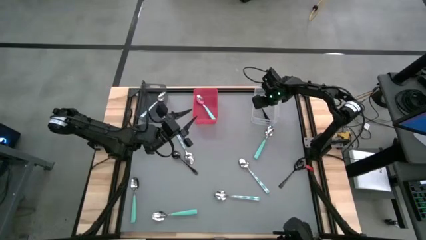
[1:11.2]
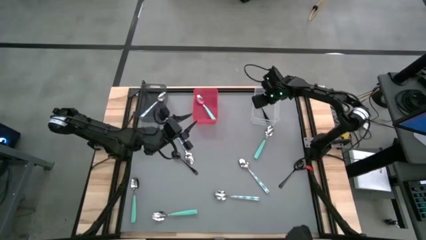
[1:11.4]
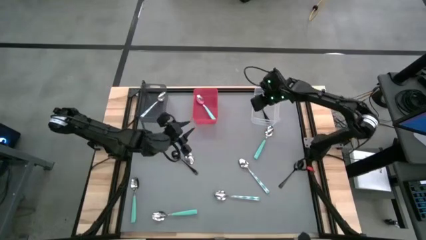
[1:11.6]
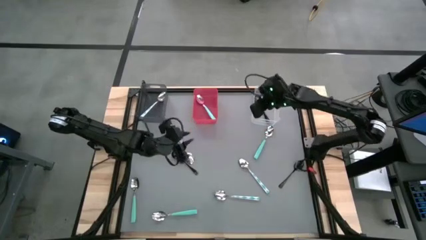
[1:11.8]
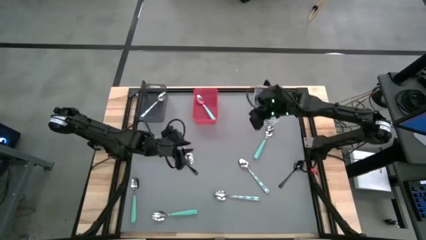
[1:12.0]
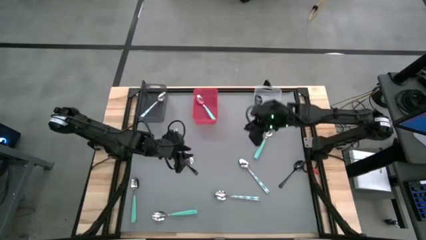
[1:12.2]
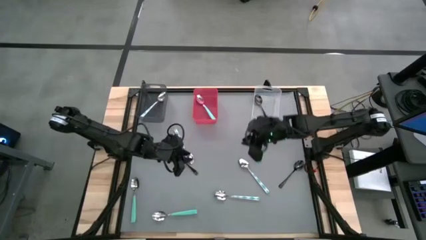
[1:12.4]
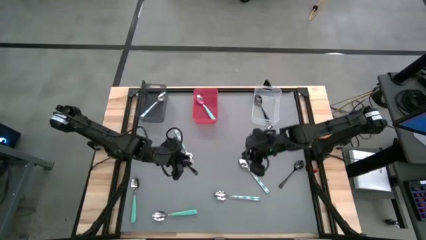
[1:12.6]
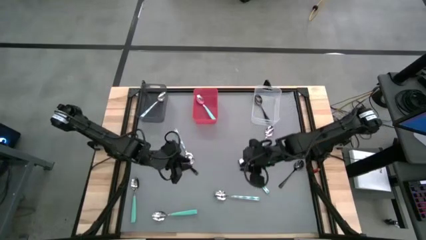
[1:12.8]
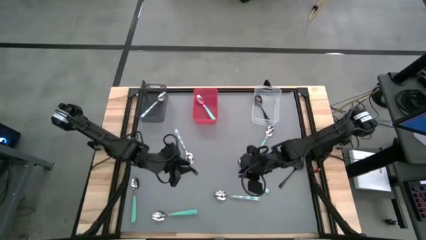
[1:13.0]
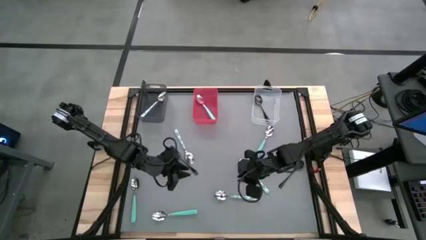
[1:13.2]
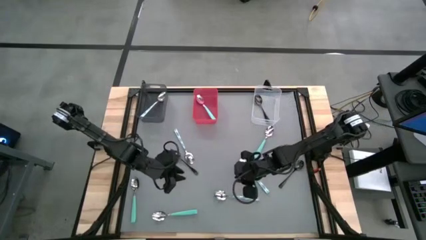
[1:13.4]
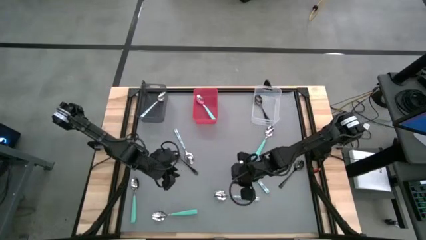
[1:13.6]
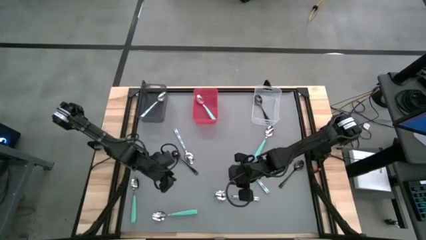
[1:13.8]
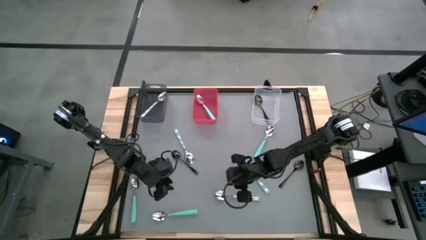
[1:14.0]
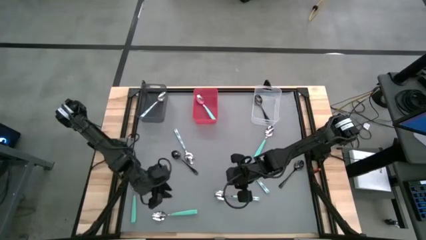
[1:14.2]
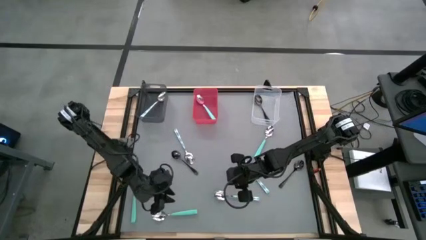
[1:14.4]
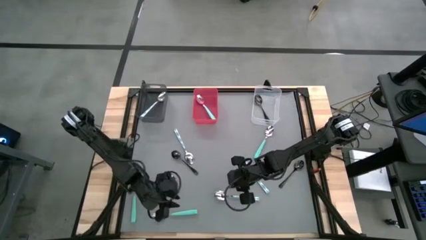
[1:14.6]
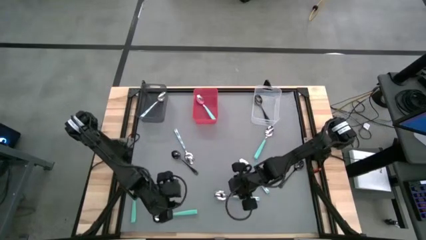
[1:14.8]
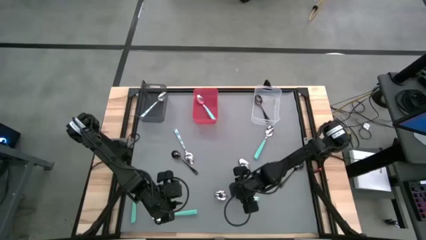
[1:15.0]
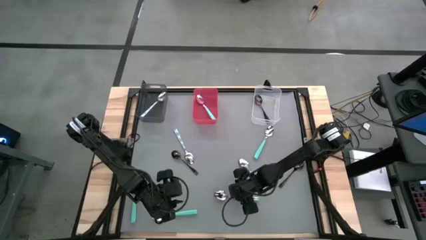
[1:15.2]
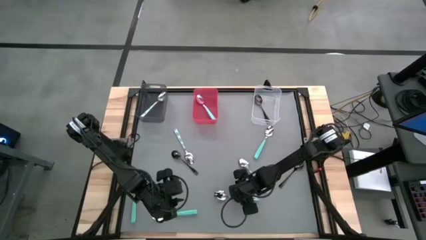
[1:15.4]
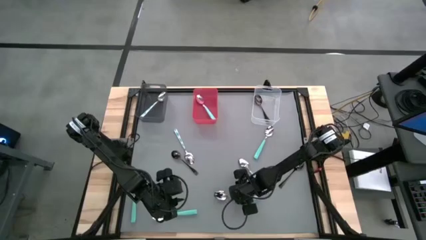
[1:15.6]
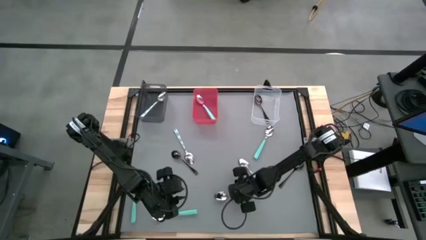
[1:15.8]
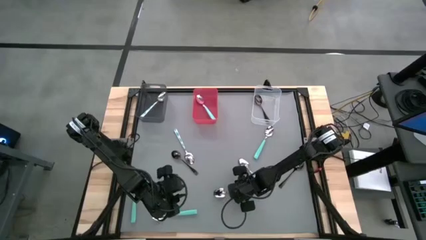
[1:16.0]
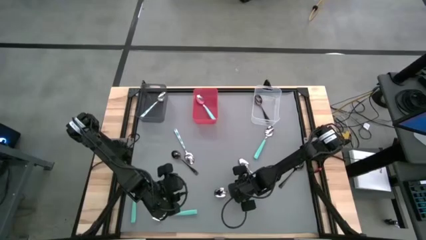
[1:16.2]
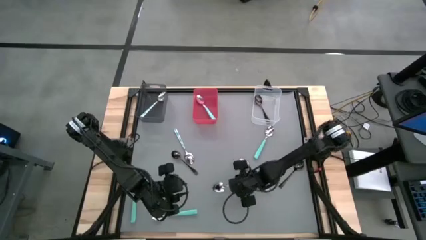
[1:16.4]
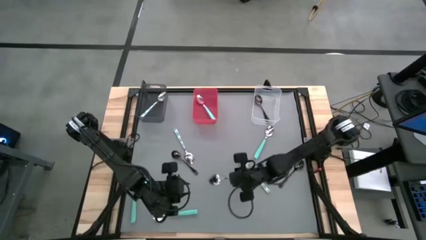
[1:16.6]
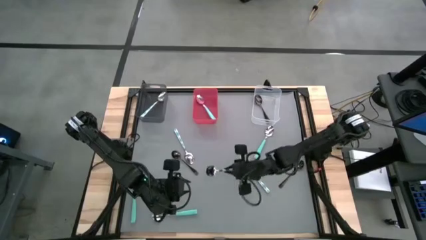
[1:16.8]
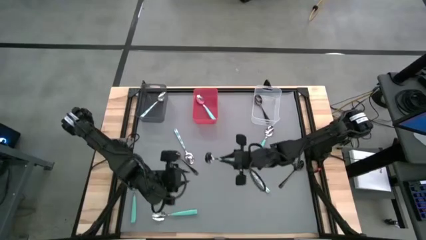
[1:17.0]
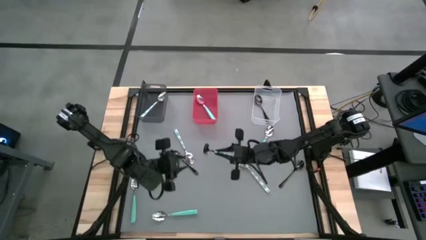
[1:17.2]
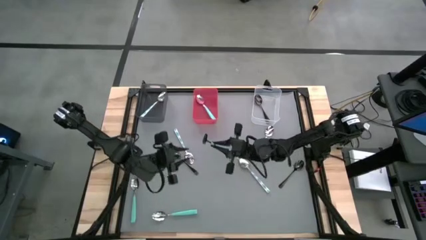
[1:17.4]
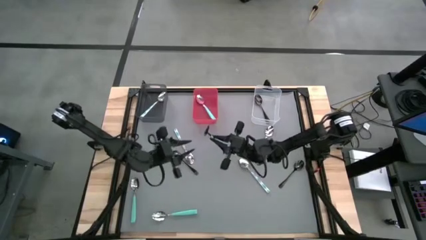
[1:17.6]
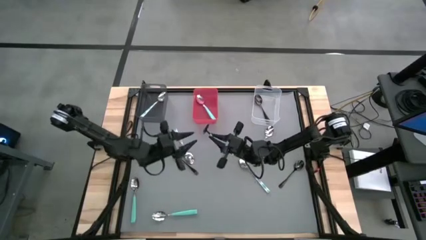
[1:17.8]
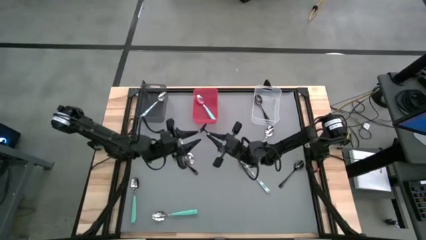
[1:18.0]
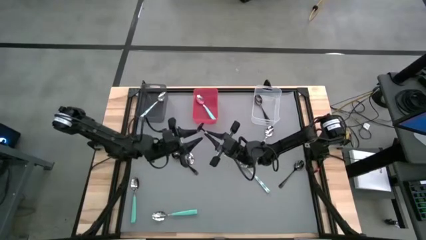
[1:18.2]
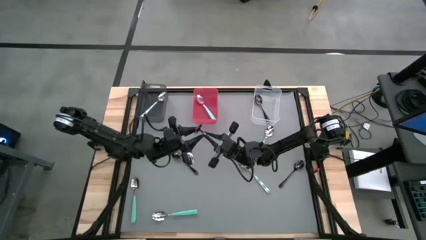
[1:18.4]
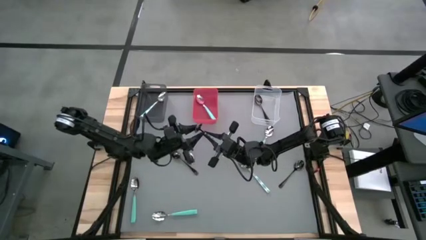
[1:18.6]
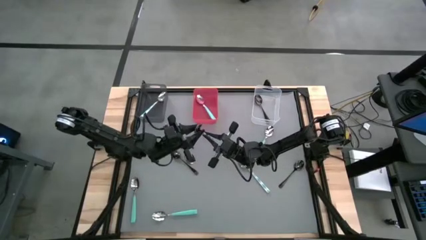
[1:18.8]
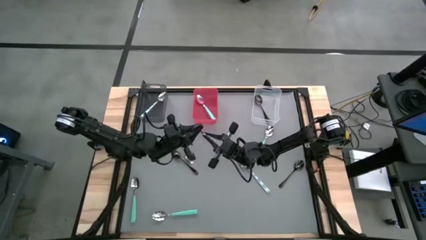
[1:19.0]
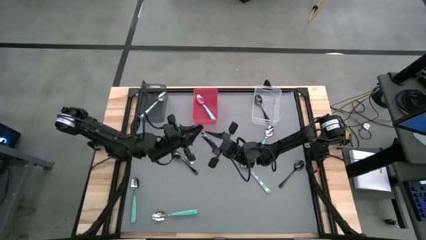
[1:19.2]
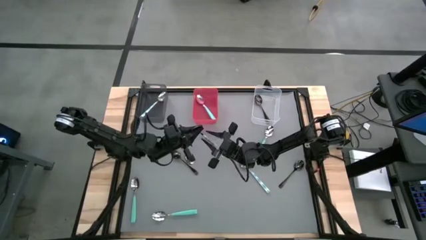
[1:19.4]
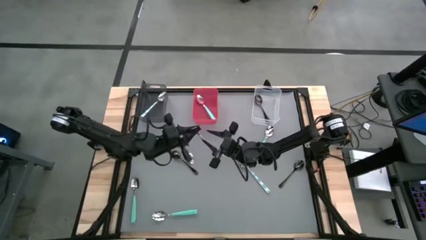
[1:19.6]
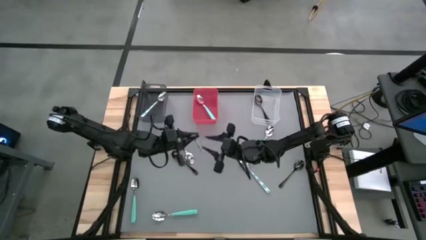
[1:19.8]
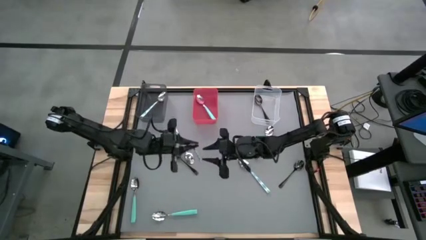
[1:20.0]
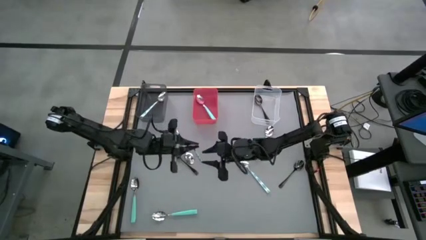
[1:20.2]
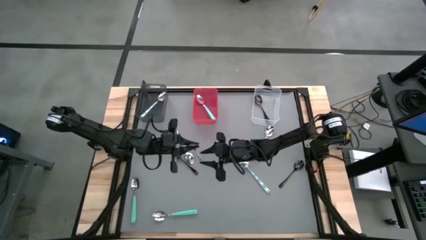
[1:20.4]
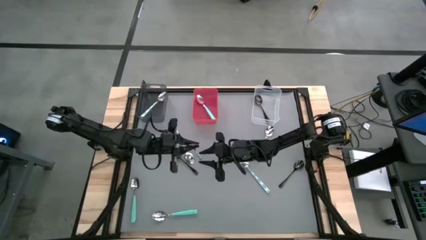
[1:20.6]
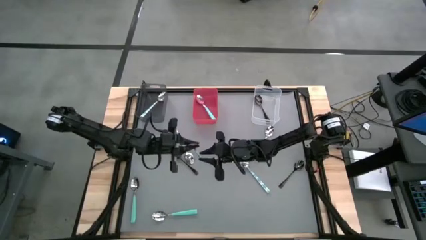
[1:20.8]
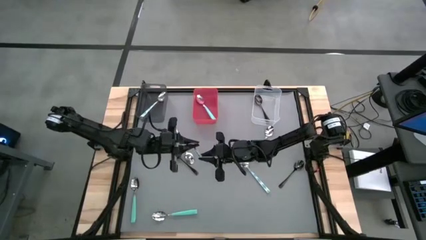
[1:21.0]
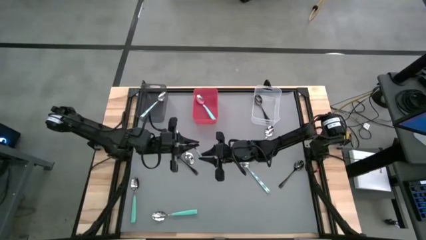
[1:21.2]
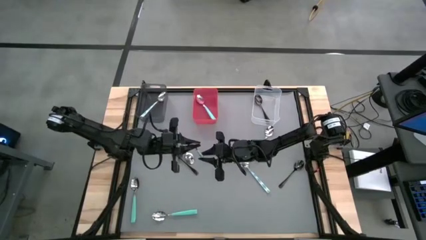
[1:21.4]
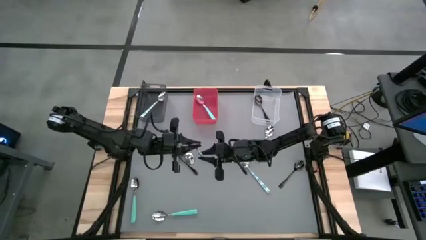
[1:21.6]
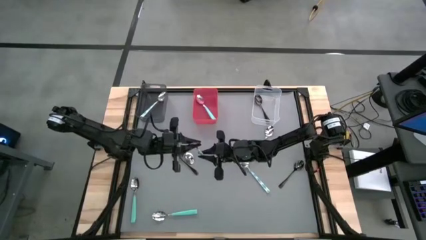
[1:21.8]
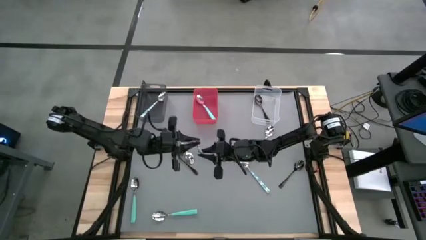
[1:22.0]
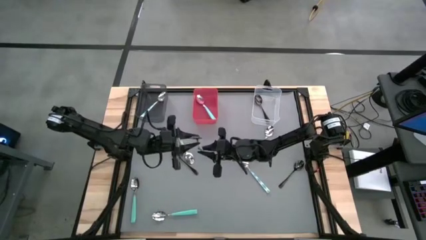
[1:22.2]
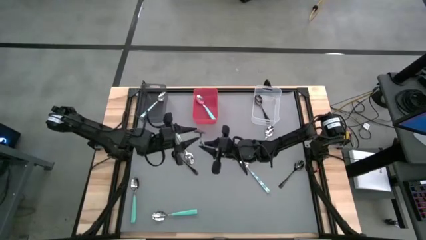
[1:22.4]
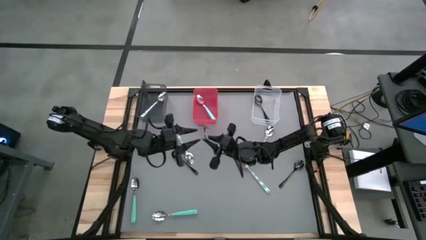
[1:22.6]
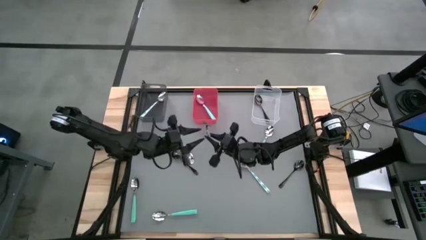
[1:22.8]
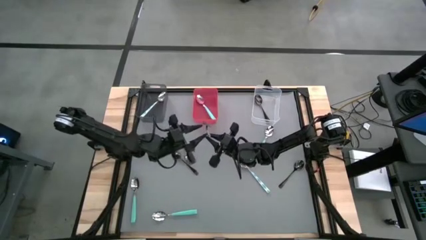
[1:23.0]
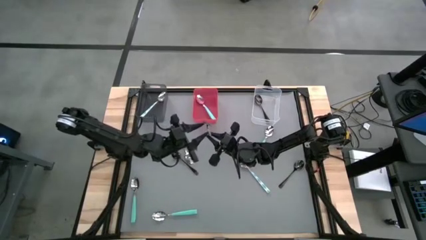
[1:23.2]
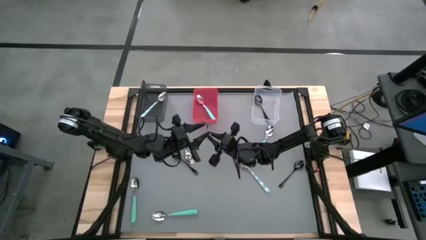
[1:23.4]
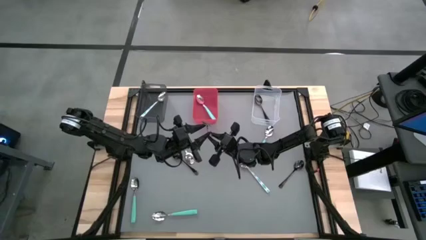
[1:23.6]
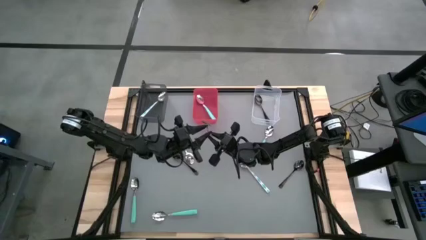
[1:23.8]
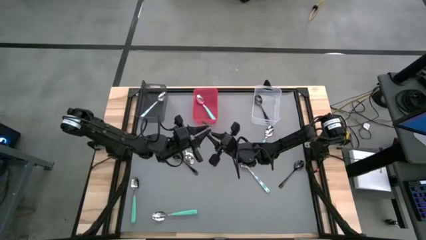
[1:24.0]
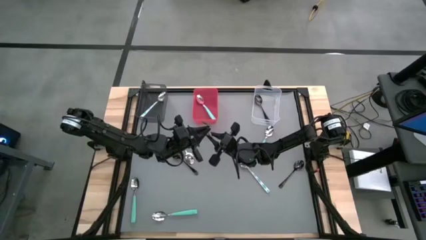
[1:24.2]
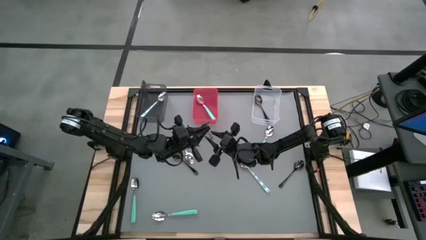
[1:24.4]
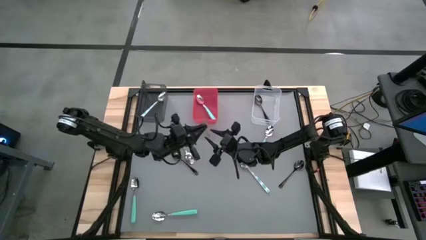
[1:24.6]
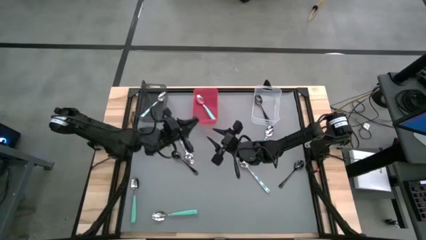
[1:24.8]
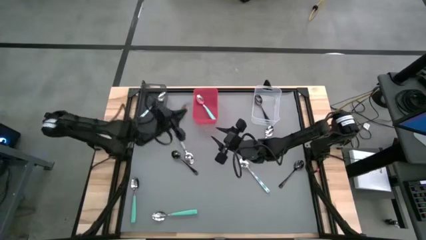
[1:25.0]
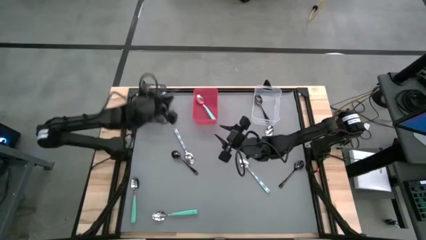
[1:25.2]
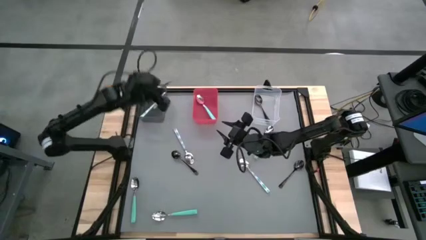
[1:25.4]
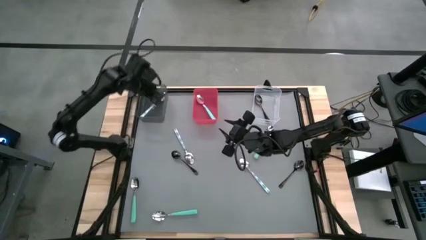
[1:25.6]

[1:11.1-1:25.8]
Task: Sort silverware by color (type)
Put the blue patterned spoon into the black bin
